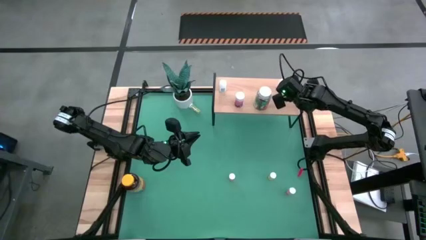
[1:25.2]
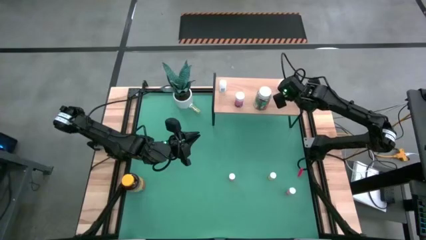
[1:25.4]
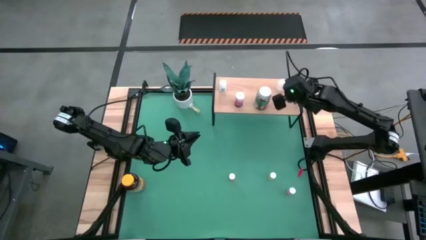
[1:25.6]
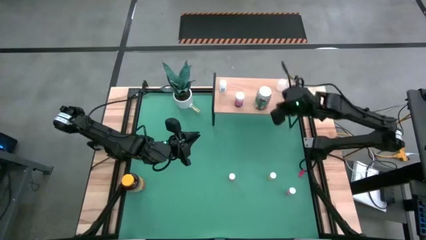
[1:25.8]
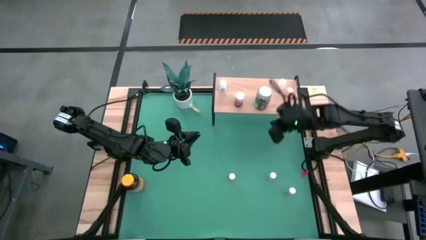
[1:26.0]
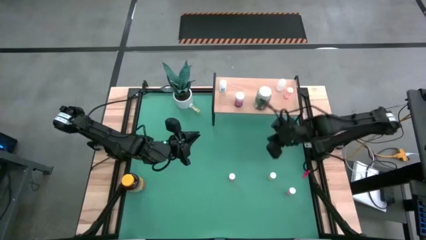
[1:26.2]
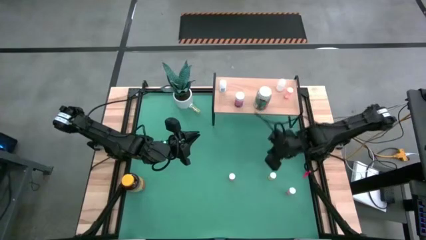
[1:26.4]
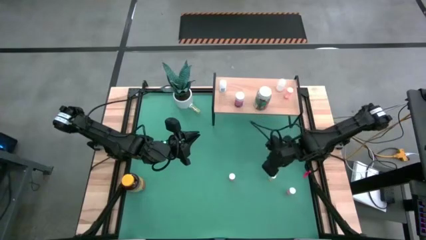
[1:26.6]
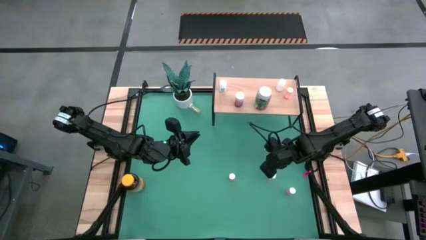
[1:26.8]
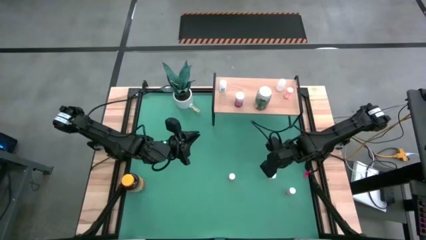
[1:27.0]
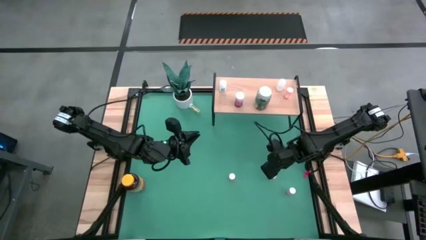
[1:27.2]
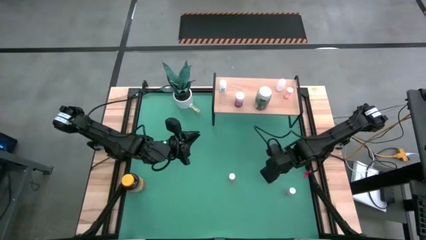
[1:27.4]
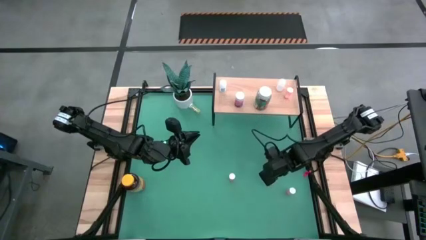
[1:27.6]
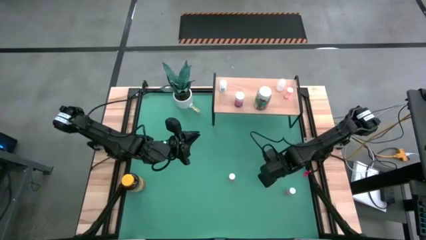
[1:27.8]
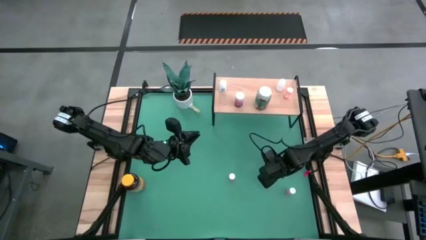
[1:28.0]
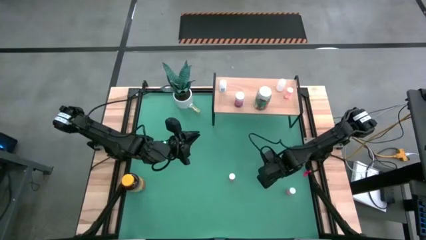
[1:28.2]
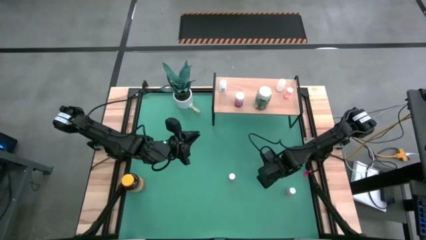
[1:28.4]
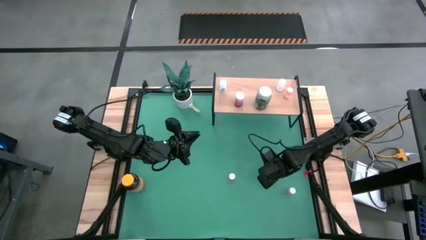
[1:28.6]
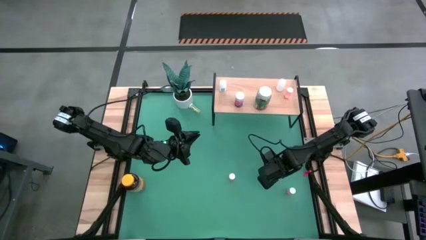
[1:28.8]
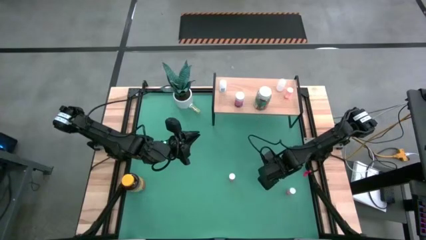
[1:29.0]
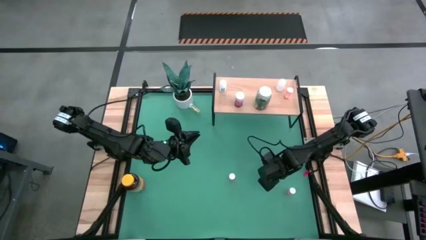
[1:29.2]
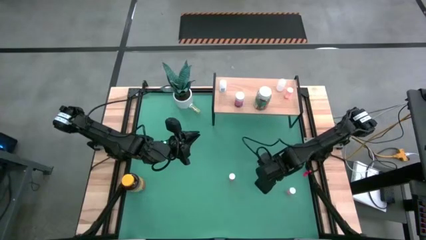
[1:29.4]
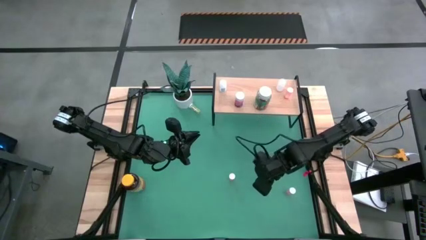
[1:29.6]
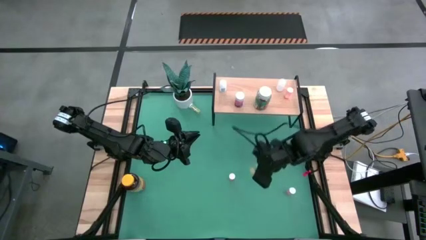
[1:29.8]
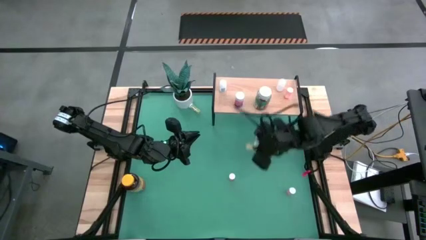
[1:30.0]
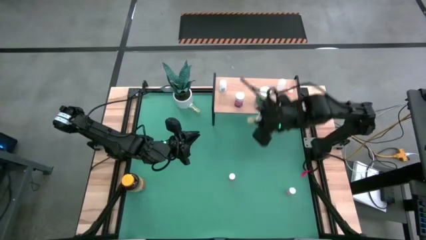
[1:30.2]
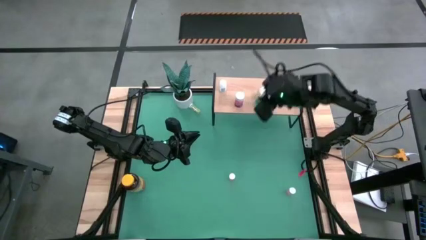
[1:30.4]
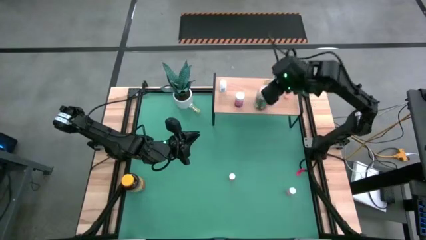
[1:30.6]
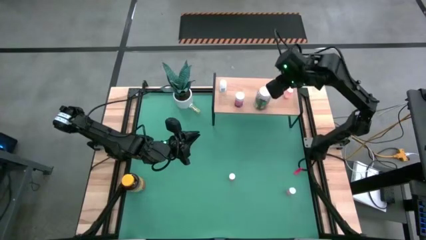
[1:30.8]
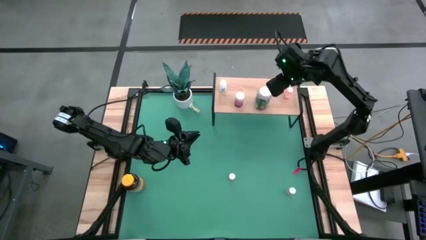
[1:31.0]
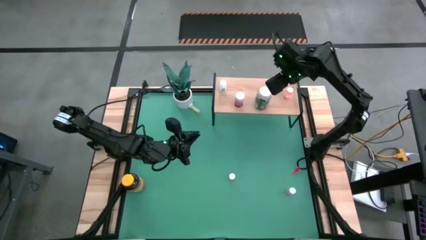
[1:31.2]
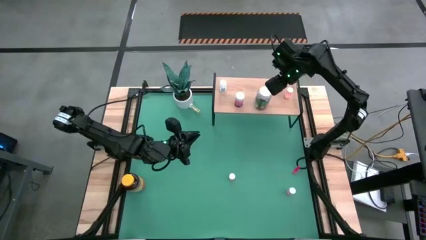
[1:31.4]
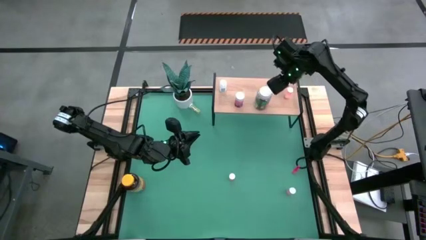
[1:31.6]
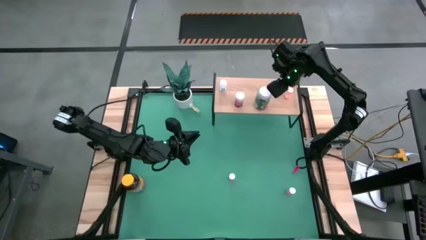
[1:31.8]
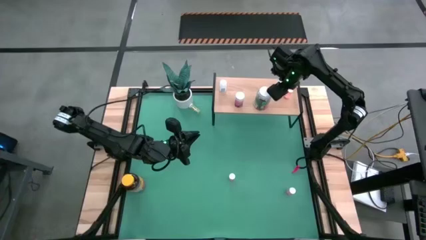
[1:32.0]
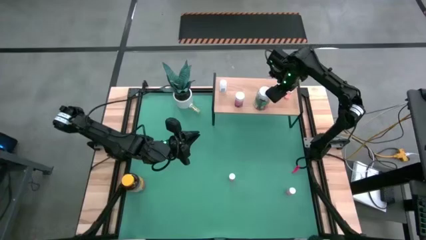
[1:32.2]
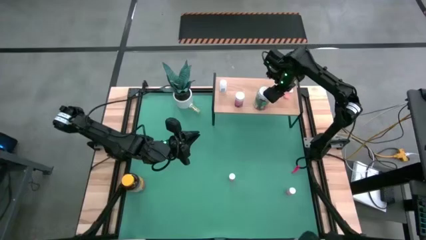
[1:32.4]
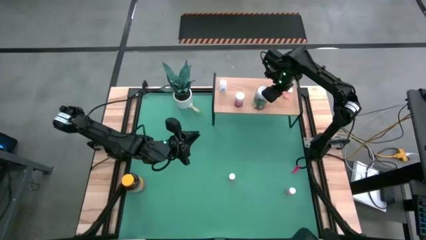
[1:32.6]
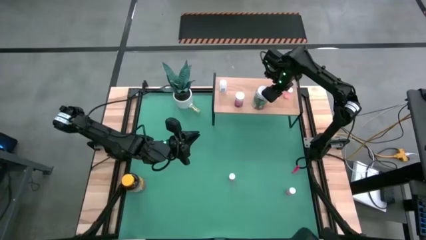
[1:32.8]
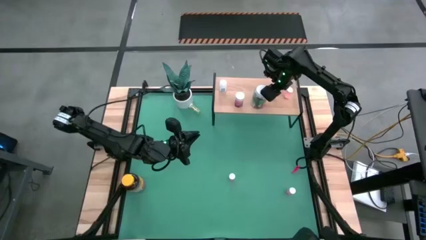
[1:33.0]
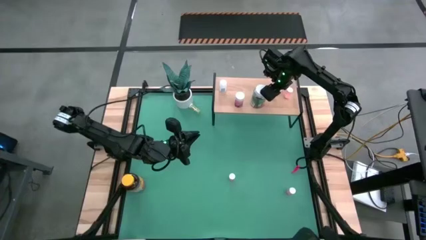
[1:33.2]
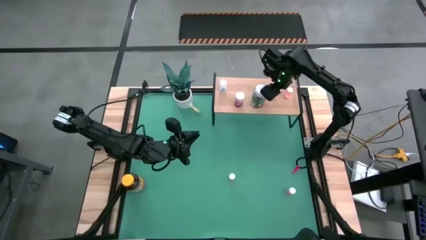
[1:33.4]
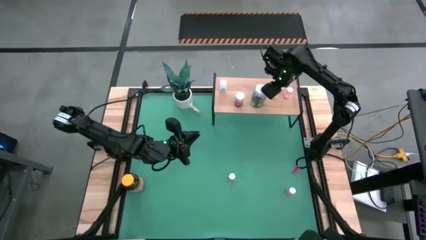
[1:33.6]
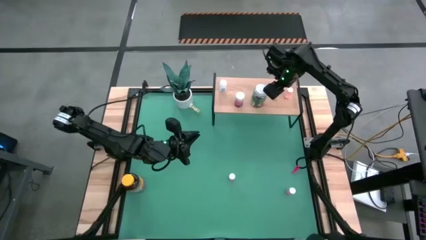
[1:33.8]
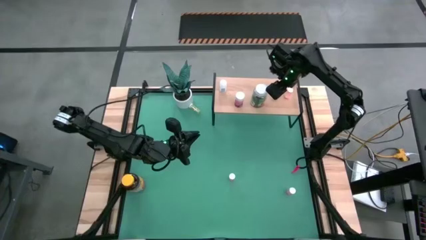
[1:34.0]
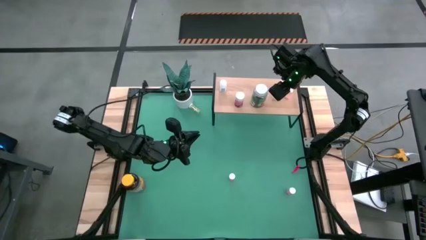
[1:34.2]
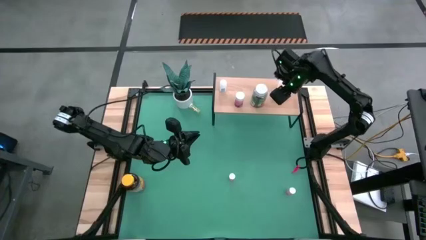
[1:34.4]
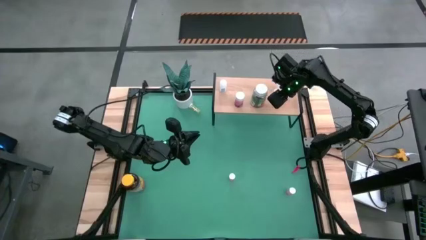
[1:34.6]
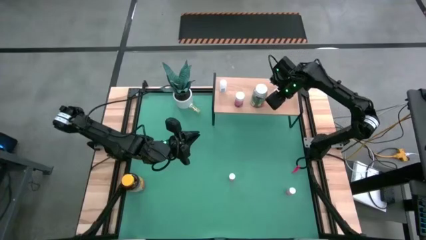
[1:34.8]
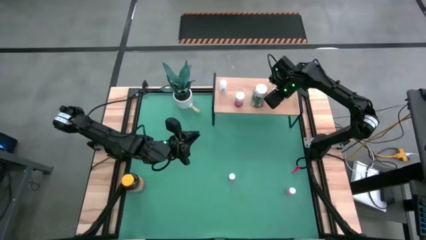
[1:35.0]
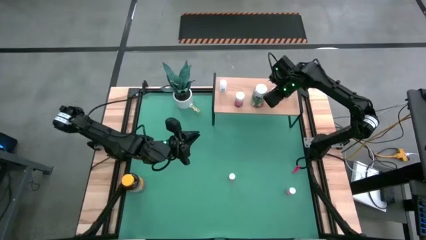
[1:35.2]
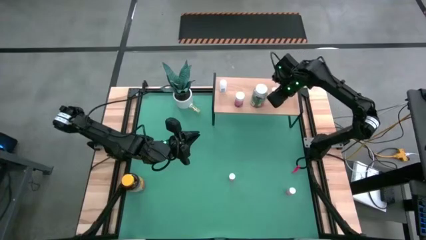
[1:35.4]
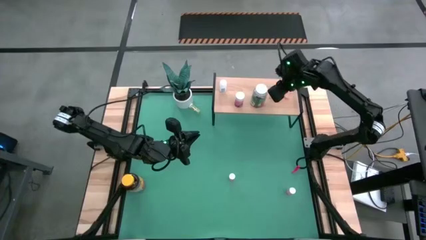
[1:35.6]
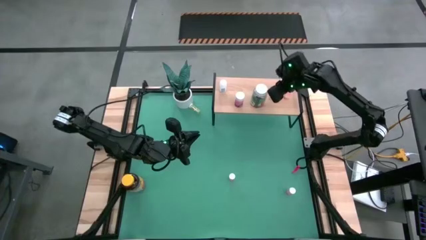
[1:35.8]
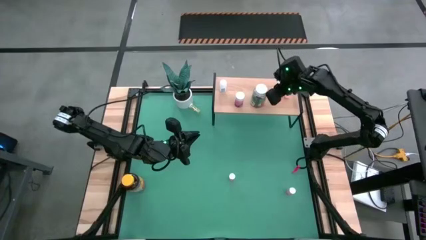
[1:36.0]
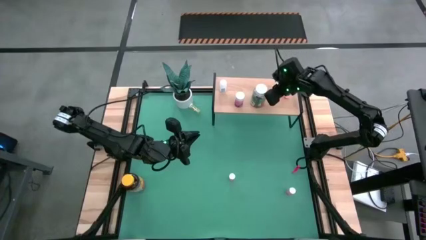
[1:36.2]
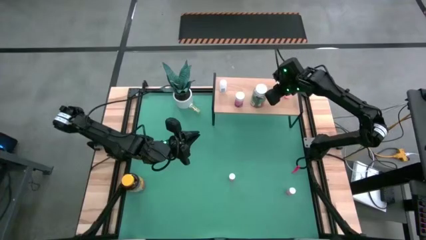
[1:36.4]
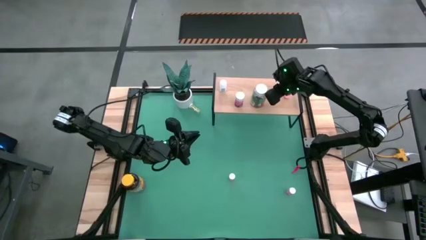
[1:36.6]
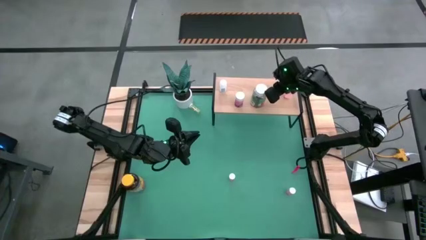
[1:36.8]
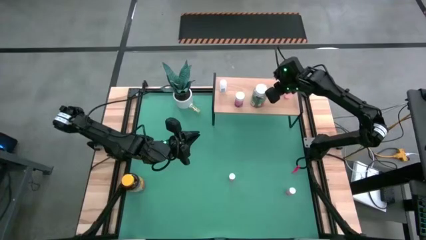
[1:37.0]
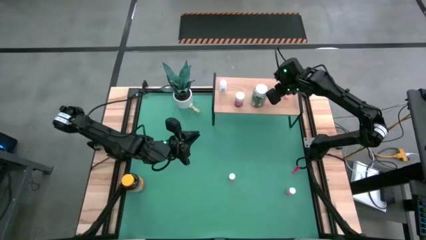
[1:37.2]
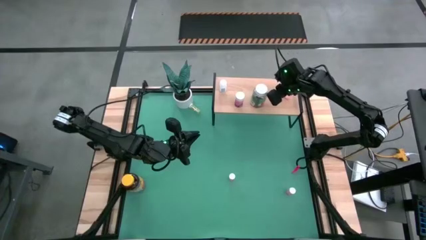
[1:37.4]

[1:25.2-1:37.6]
Task: Pick and place medicine bottles onto shelf by color
Put the bottom light yellow pill bottle on the shelf

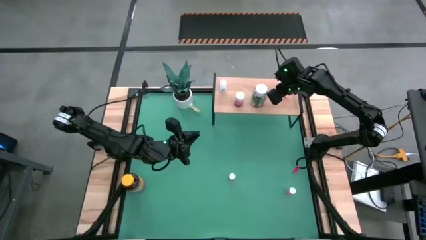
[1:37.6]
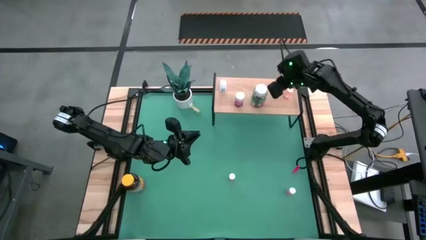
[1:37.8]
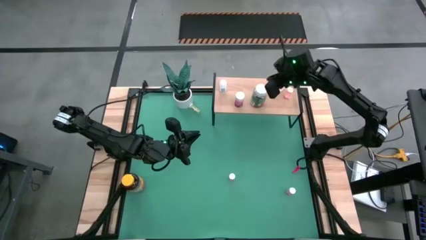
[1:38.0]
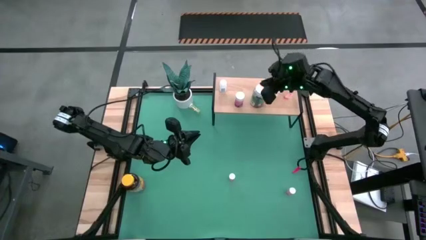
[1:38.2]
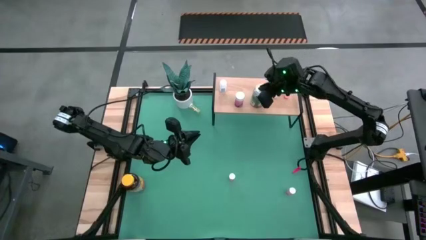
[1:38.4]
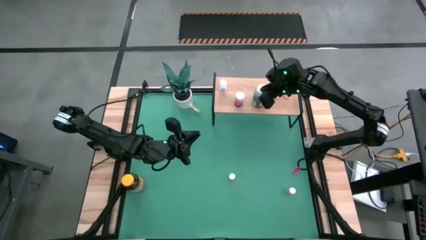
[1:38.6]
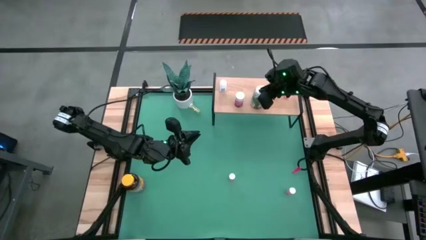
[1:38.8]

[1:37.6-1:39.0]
Adjust the green pill bottle

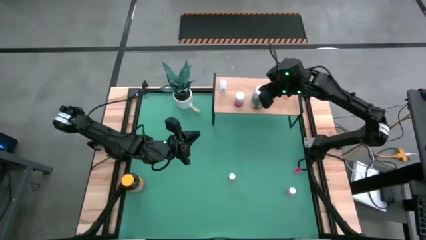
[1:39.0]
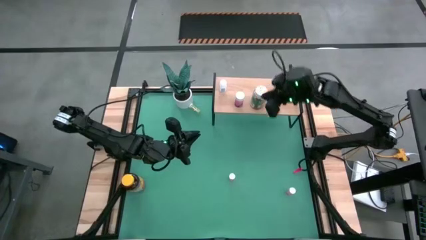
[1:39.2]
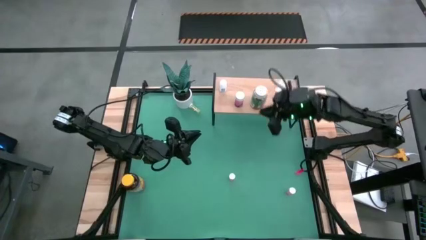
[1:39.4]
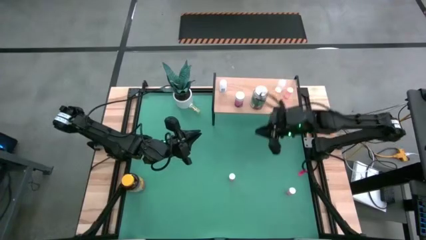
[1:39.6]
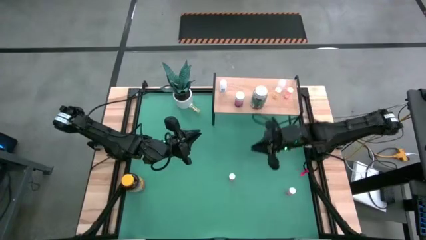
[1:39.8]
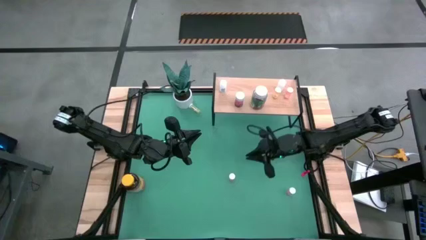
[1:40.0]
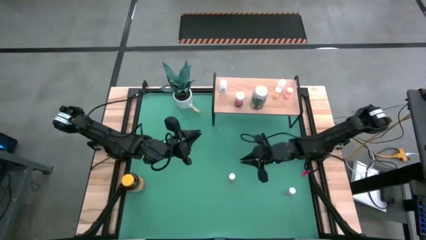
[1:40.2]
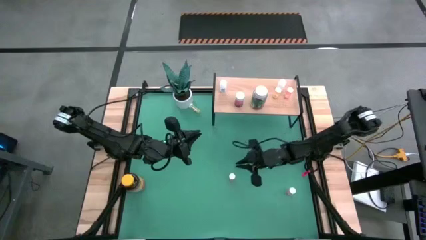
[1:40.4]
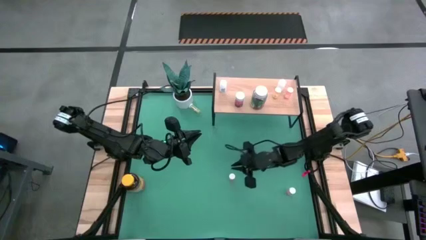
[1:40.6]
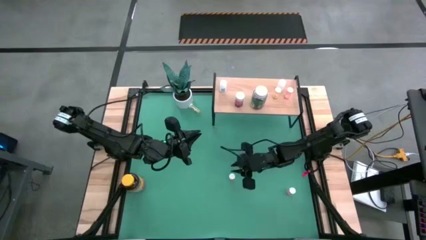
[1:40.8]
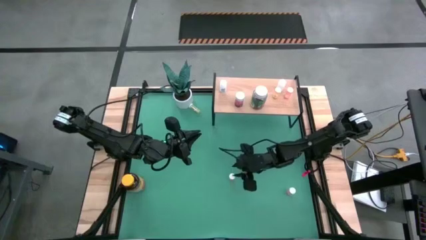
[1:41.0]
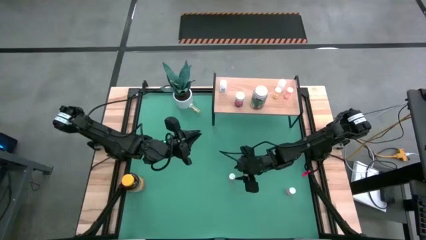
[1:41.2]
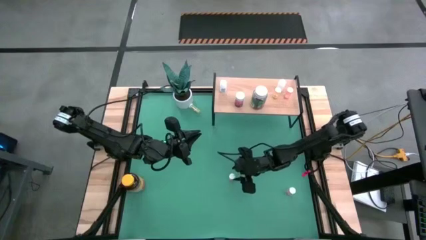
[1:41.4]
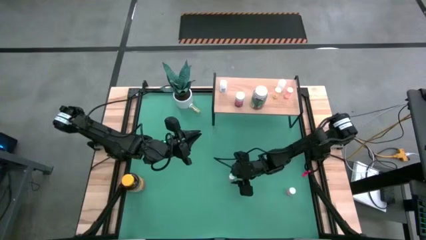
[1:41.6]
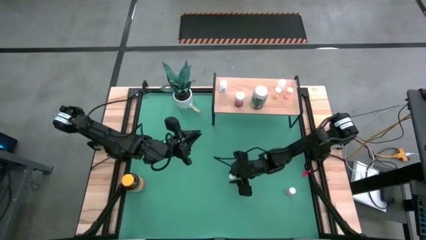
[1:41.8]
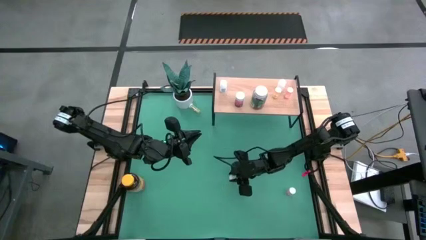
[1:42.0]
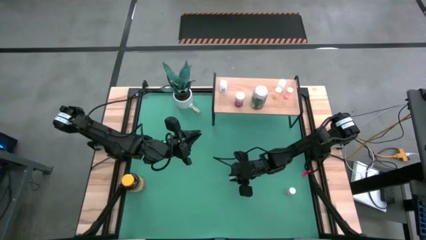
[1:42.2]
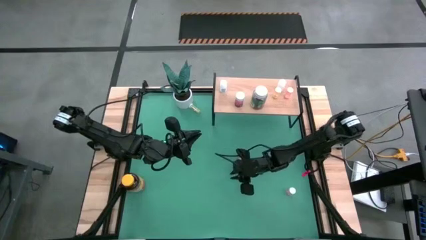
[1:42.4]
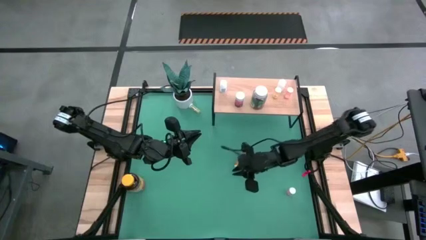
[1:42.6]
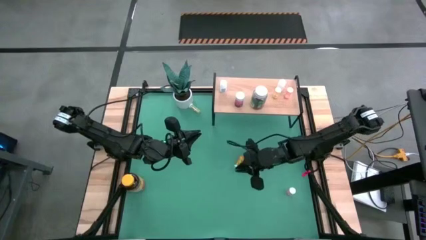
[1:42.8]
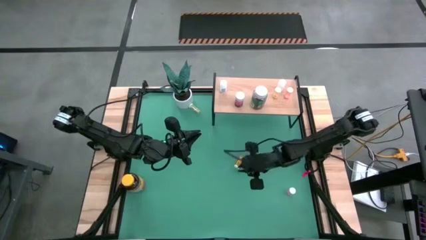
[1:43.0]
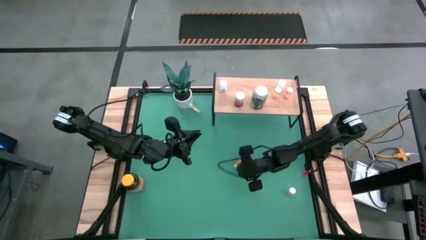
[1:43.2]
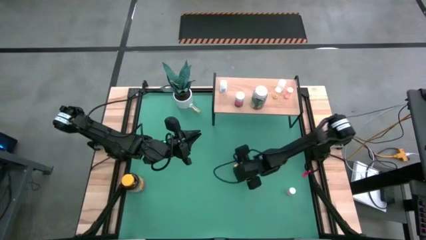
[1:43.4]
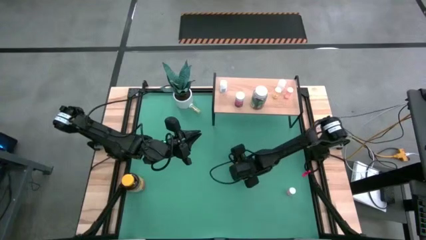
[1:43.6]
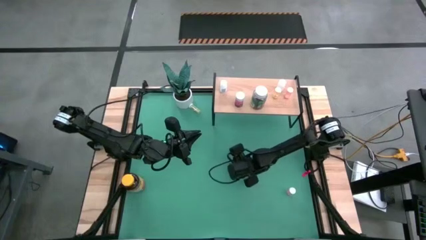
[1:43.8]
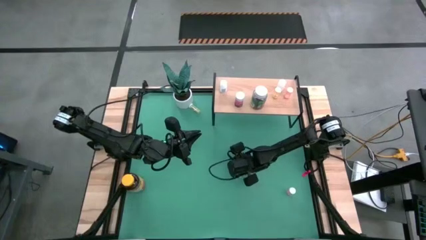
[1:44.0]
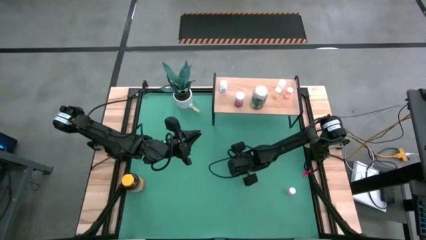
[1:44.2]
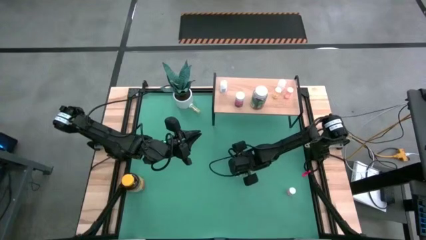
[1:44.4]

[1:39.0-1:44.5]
Put the orange pill bottle on the shelf
